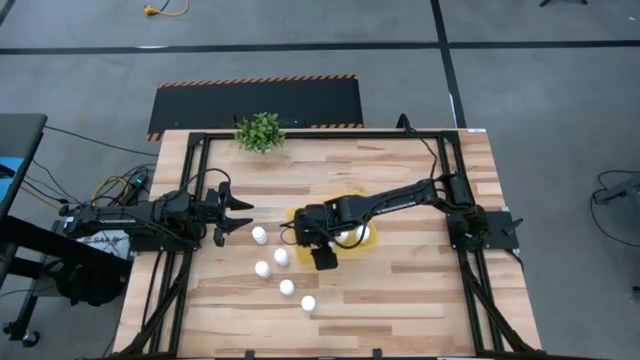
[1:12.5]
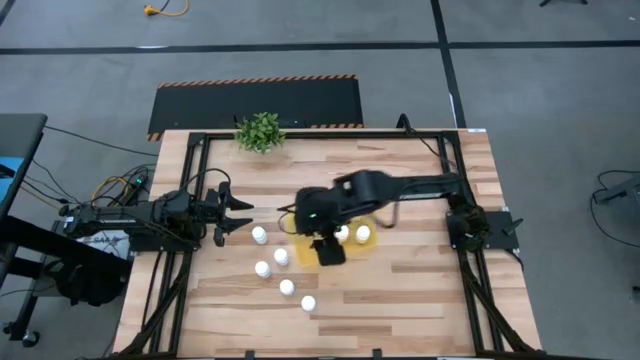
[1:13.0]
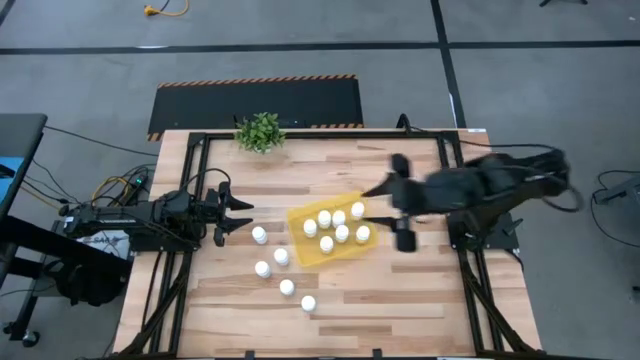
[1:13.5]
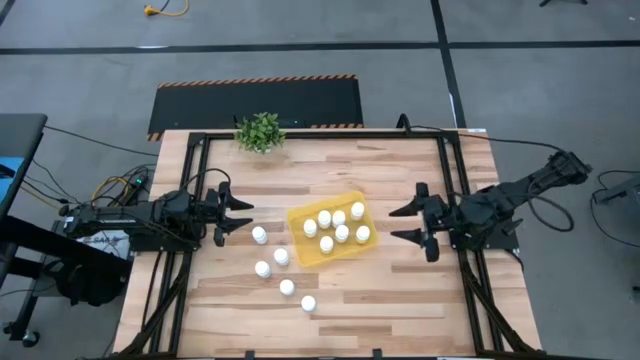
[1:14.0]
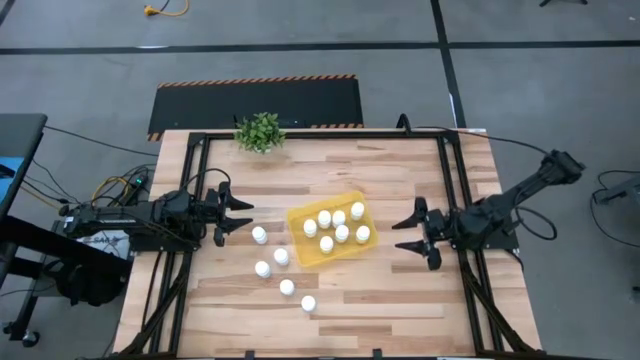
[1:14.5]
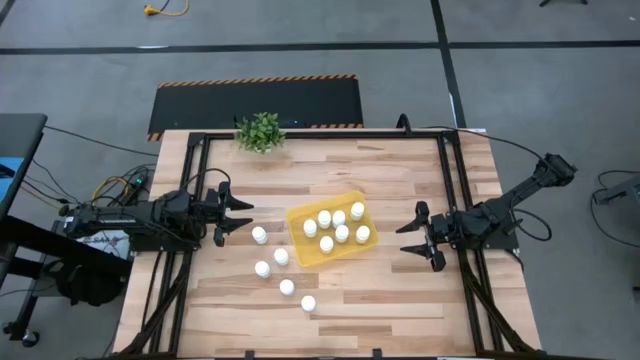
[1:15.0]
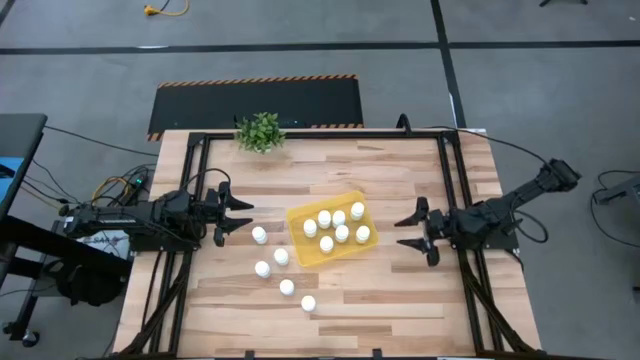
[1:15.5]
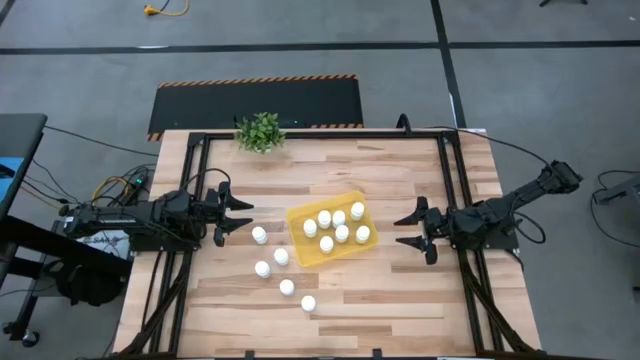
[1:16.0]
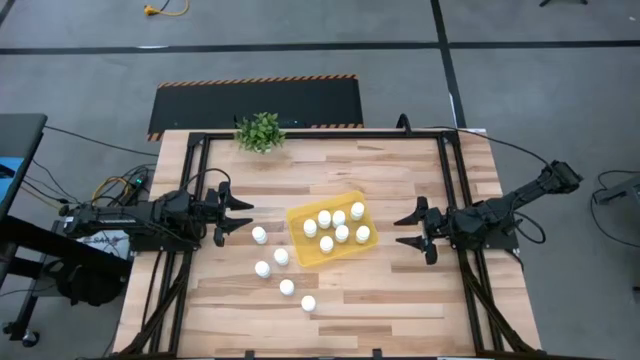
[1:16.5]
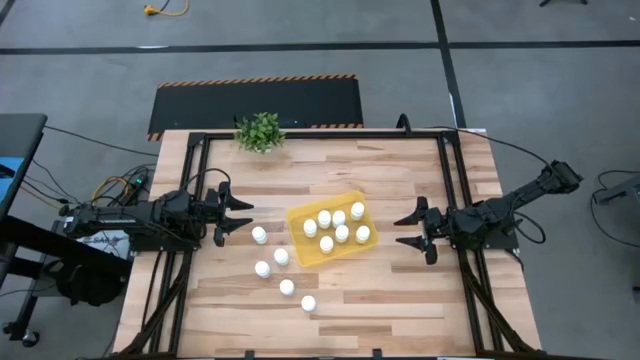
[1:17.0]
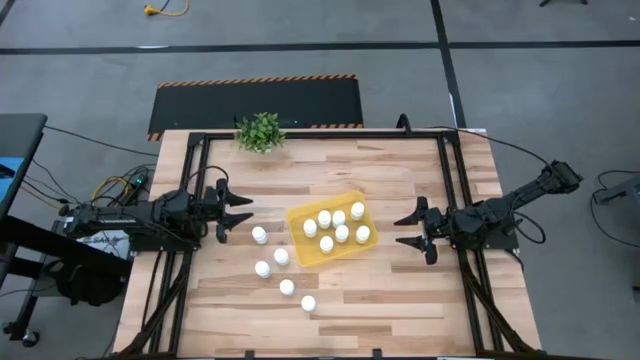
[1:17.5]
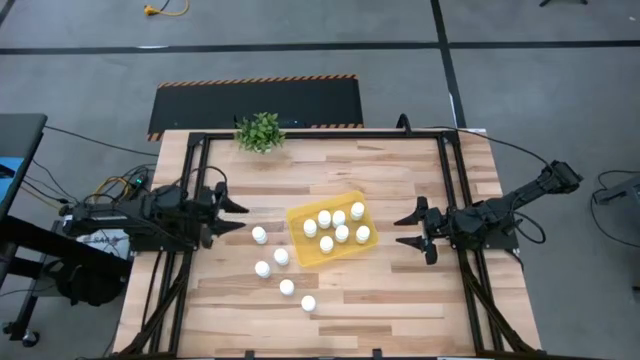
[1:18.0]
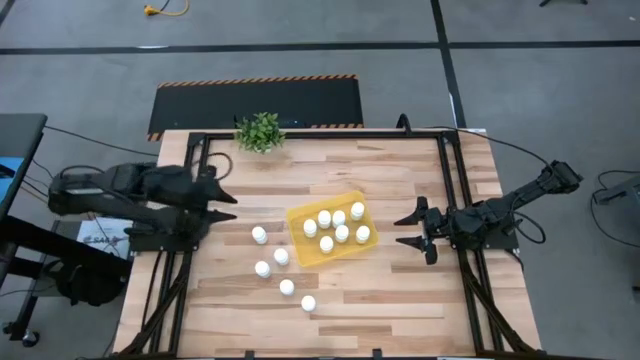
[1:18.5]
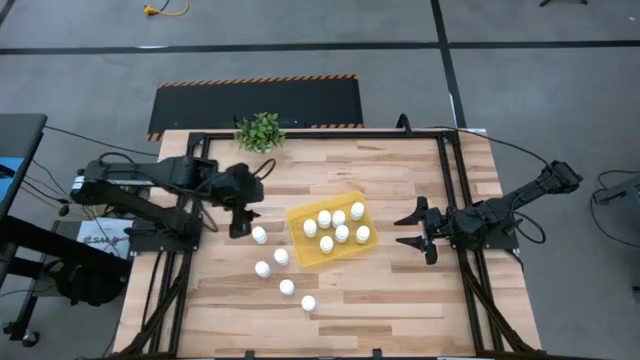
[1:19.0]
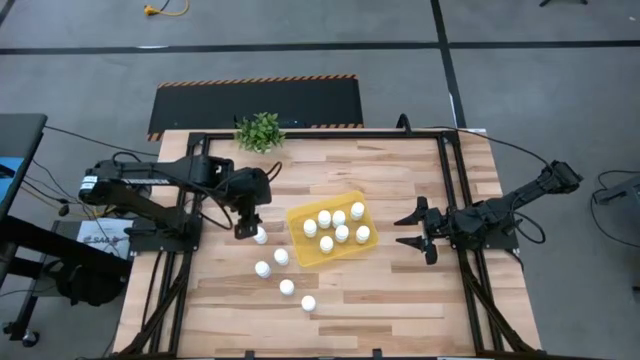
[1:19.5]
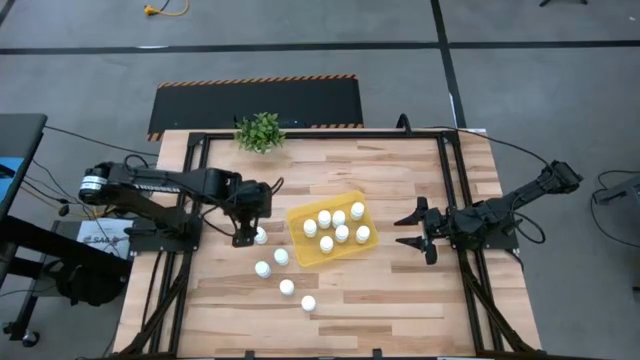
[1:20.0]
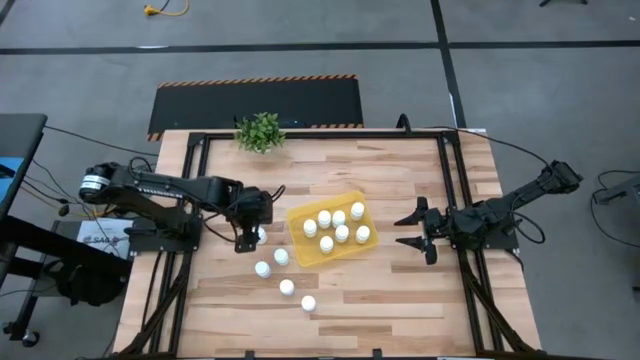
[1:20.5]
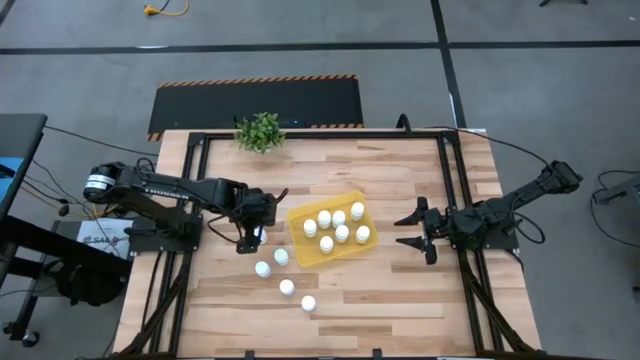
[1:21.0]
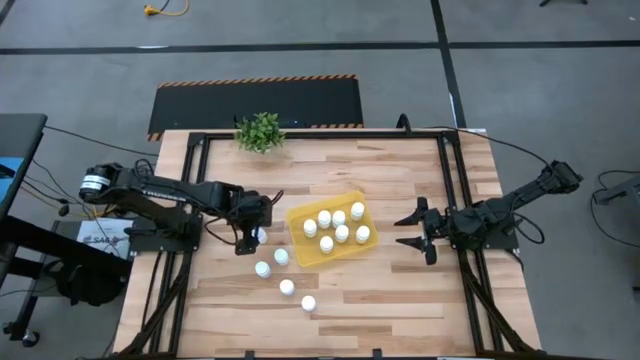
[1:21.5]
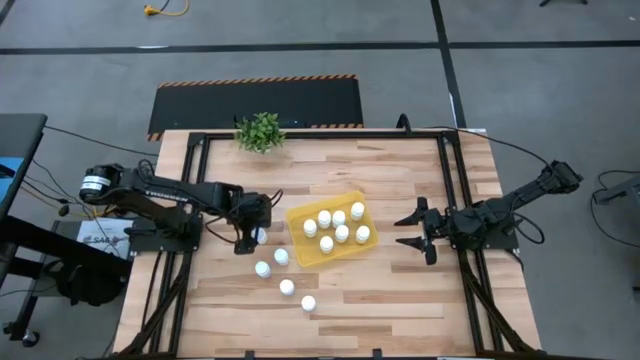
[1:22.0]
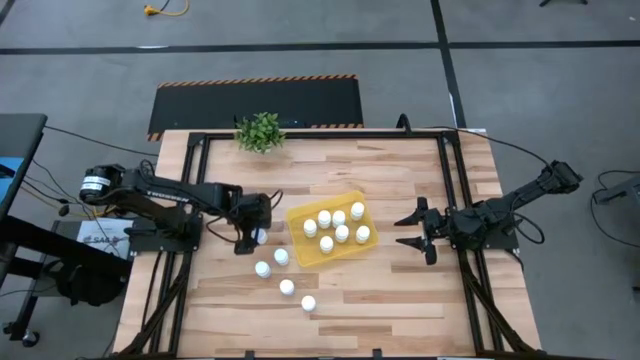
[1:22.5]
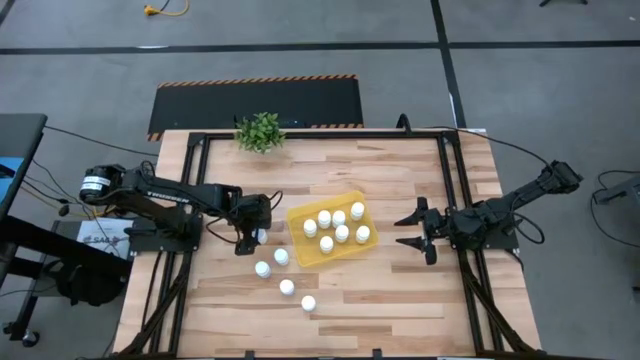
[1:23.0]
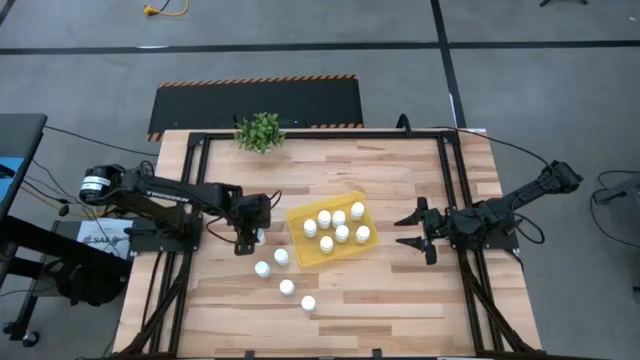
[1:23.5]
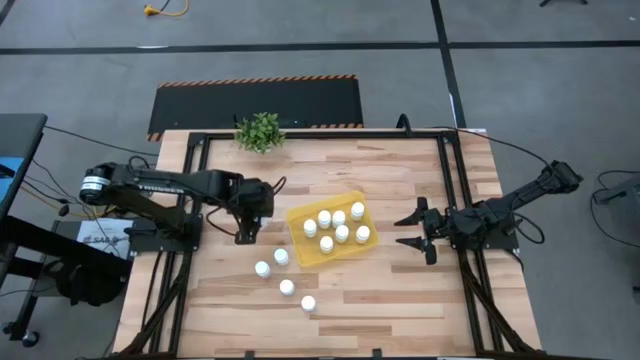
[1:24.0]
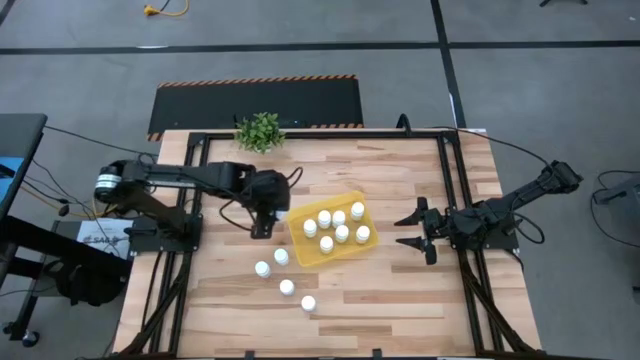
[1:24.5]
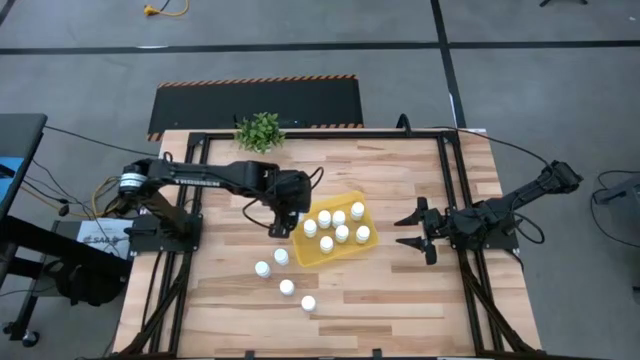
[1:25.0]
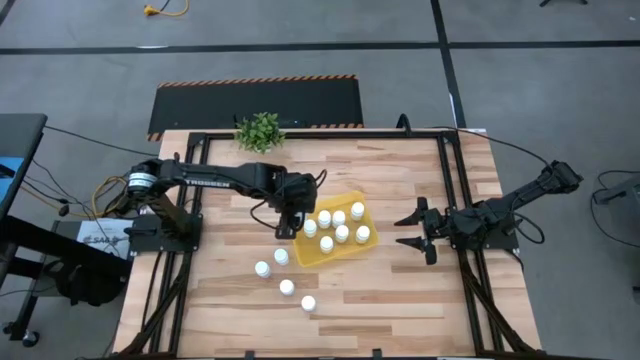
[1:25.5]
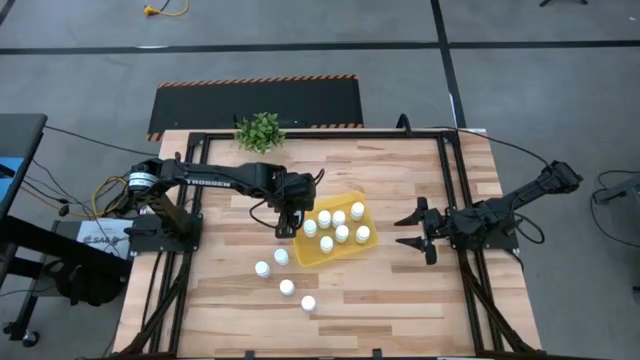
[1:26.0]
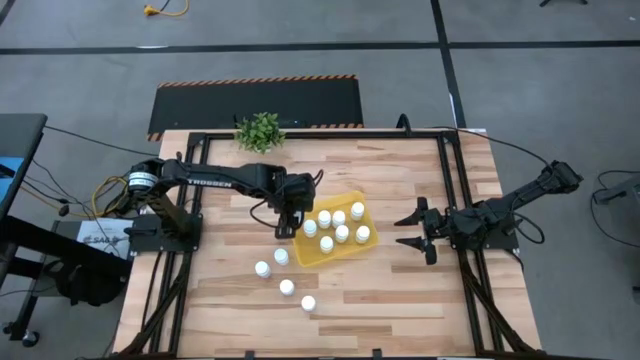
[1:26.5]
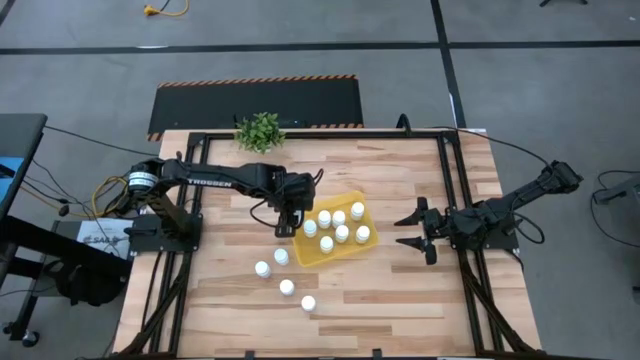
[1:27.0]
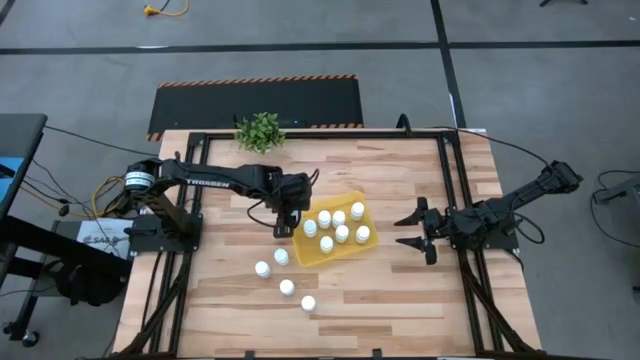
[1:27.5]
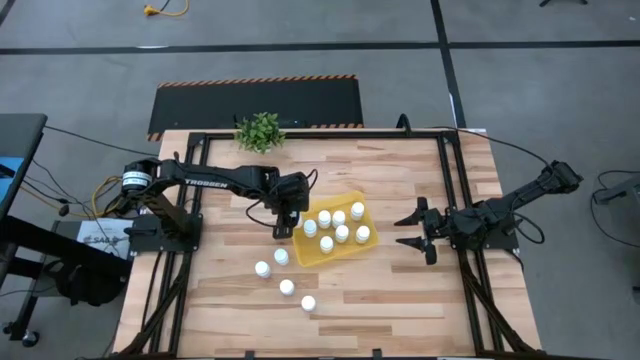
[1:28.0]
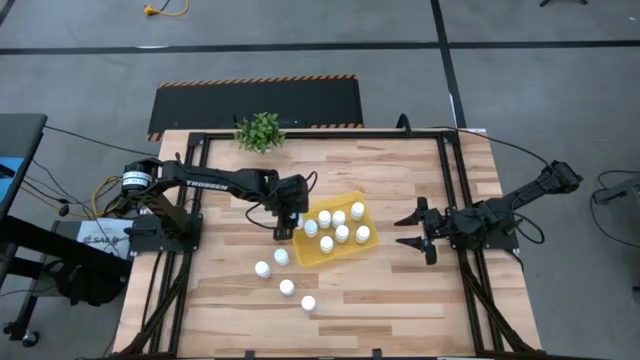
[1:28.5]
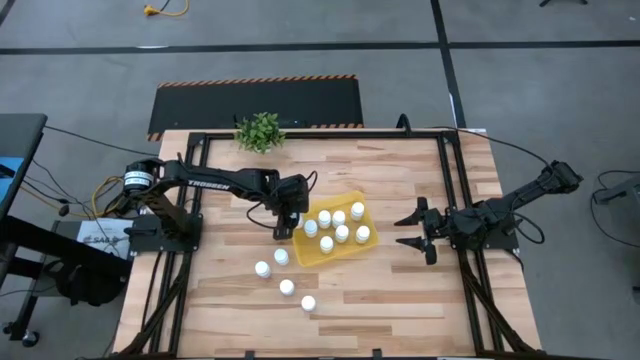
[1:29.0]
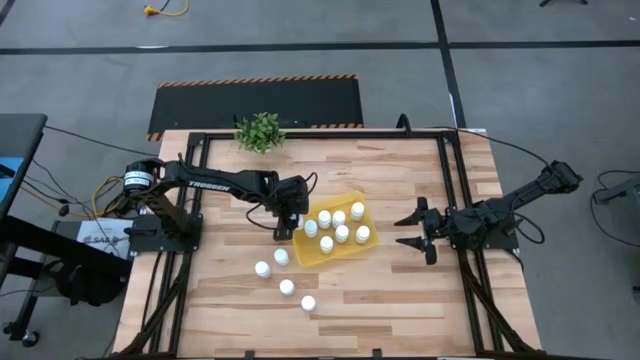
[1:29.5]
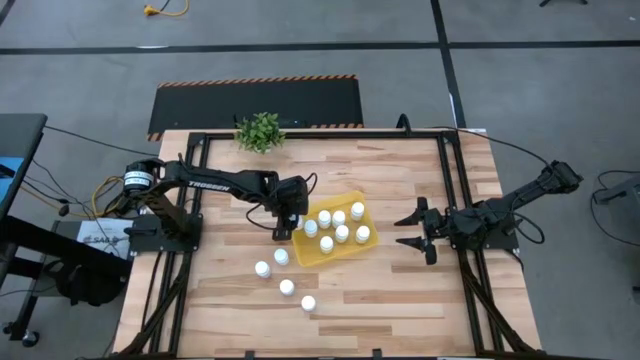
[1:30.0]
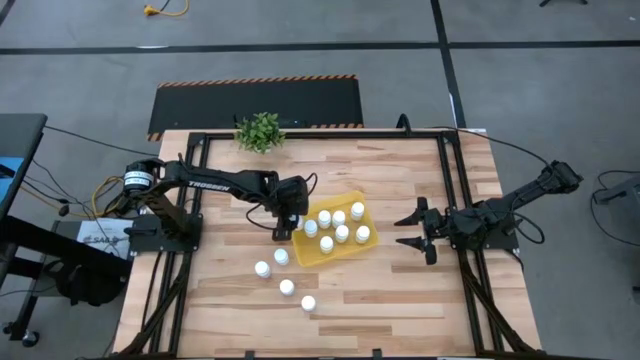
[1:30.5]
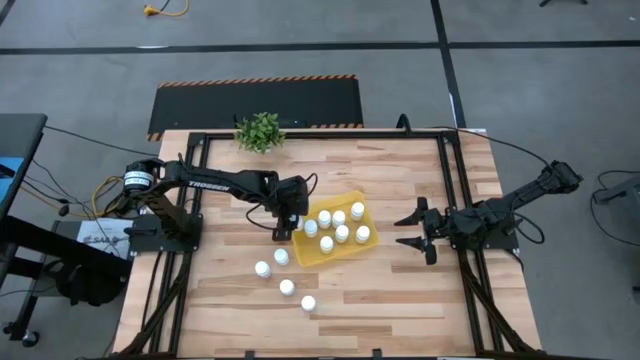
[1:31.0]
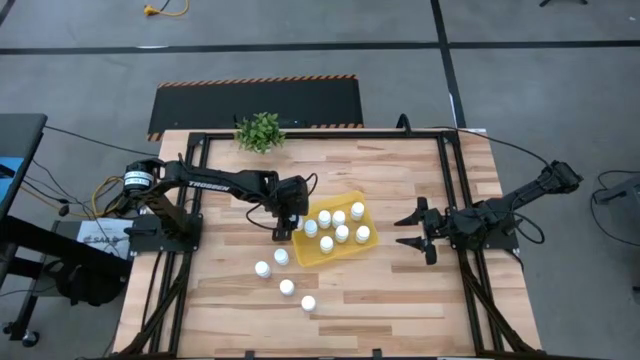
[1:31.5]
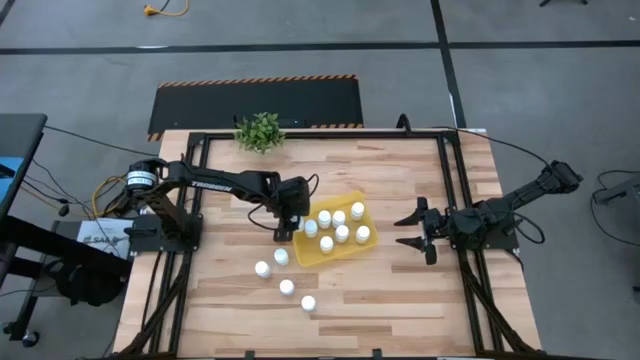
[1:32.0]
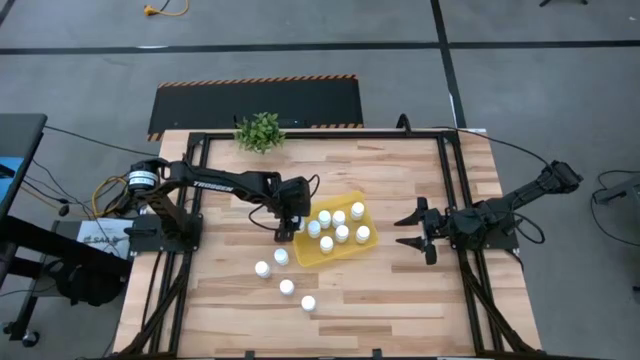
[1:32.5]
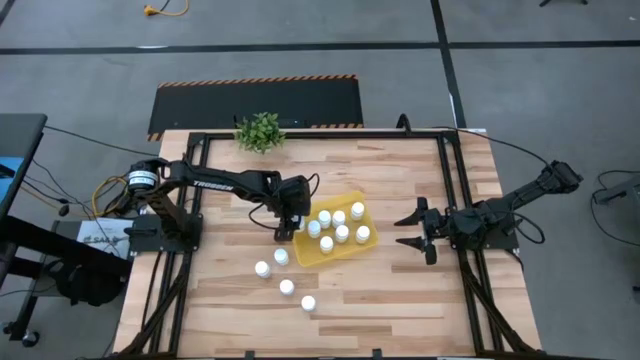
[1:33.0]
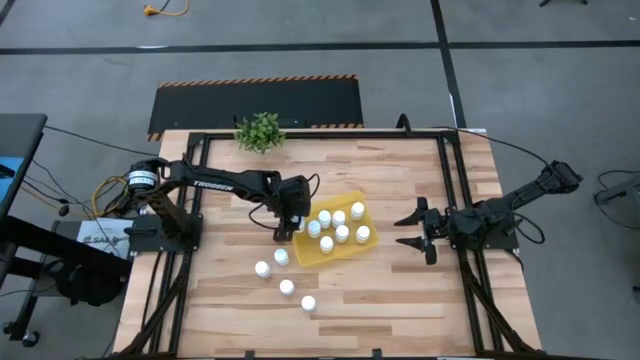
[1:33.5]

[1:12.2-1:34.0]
Task: Pick and place pill bottles into a basket
Put the white pill bottle into the yellow bin

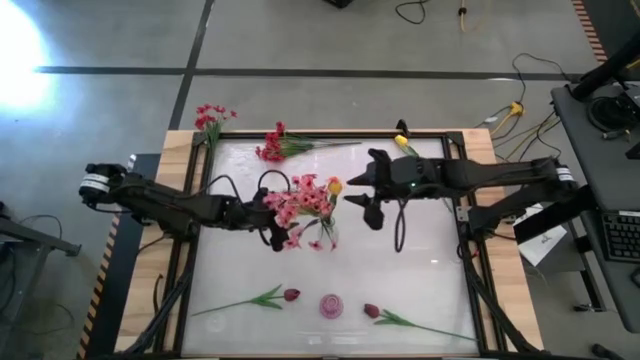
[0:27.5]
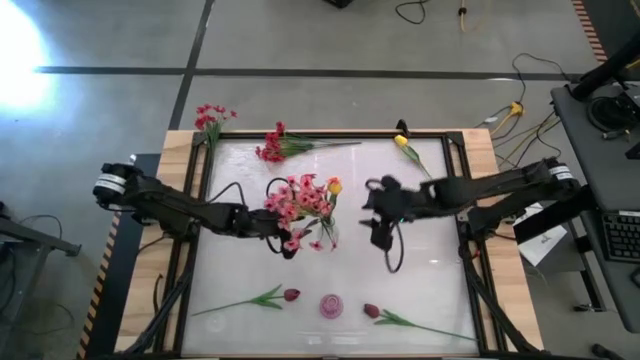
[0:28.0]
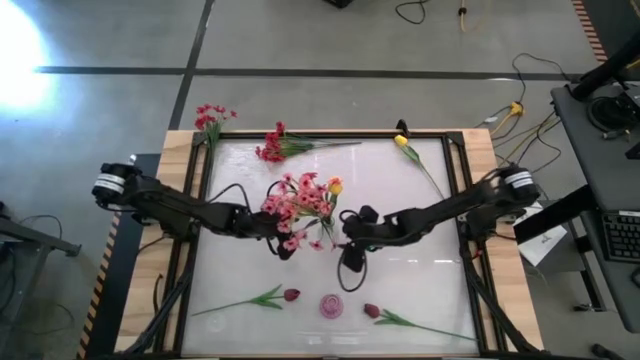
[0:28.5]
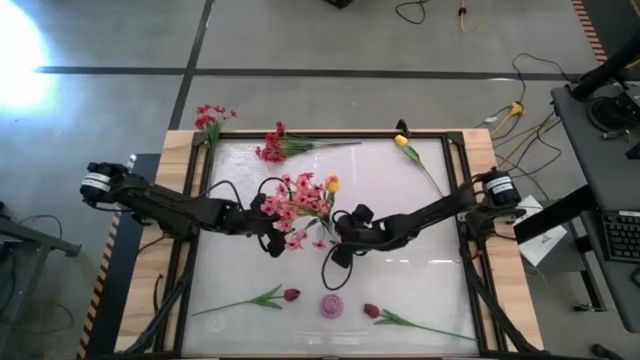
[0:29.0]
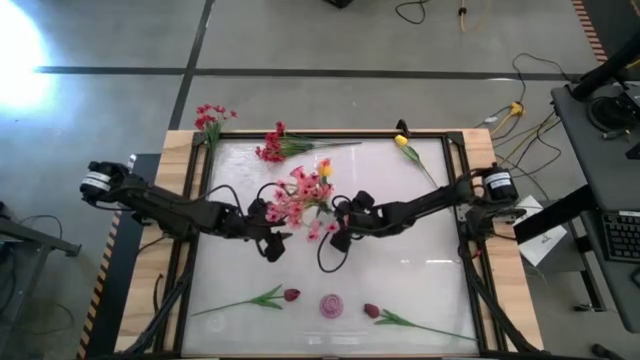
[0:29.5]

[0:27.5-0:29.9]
Task: Sort flowers into vase by color
Adjust the transparent vase
